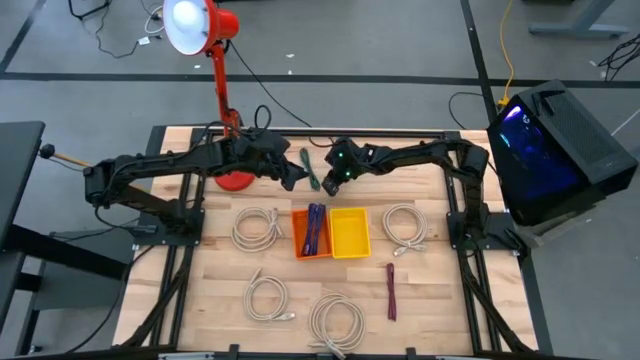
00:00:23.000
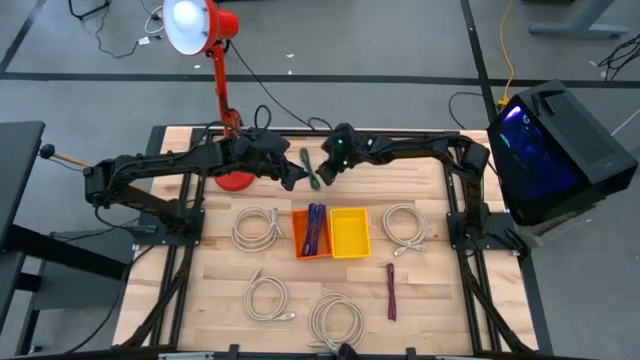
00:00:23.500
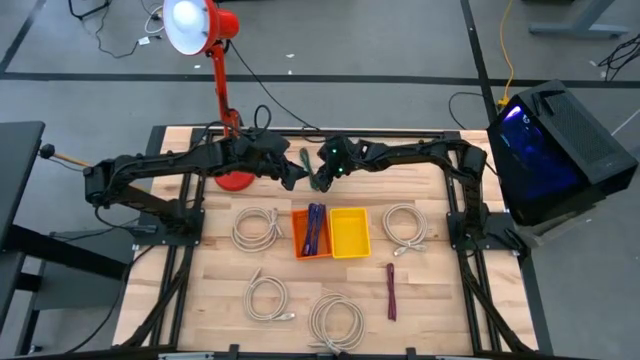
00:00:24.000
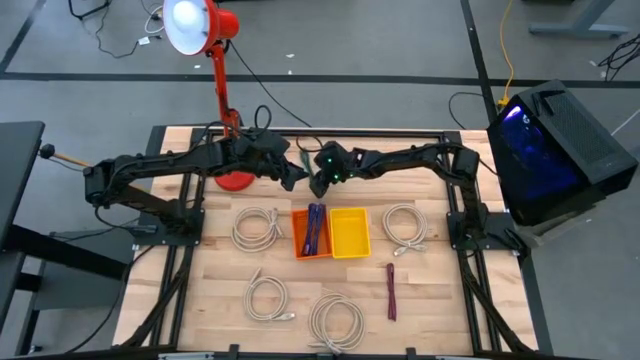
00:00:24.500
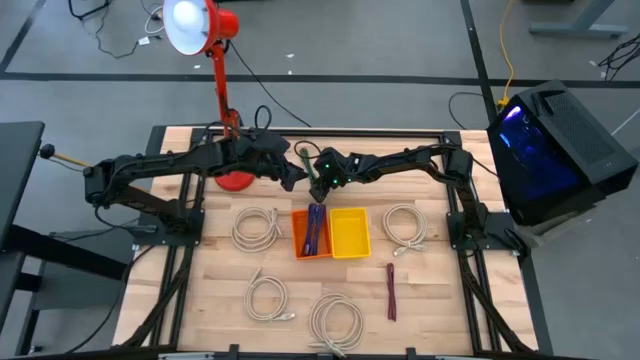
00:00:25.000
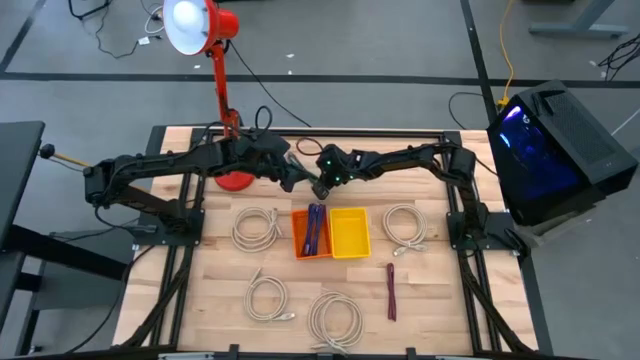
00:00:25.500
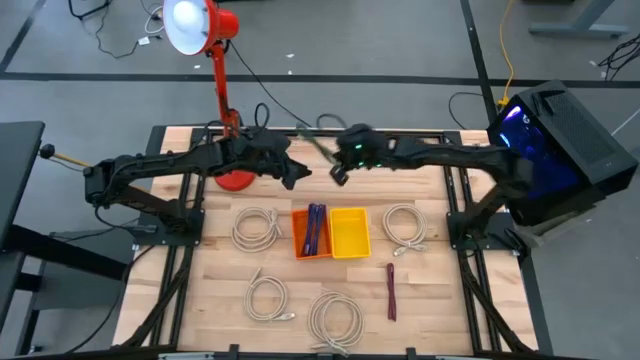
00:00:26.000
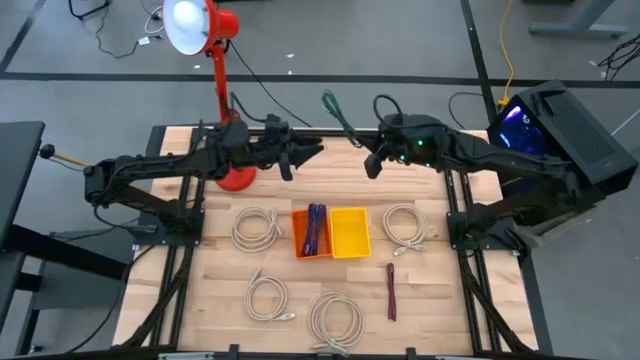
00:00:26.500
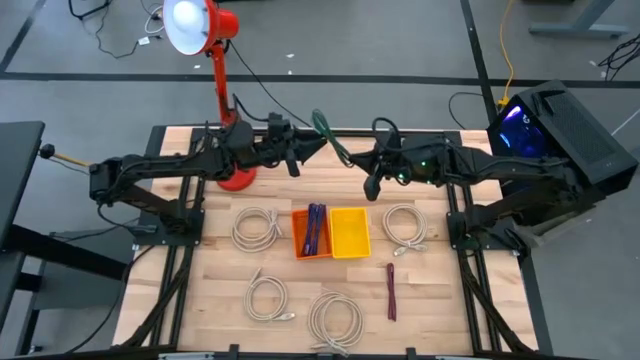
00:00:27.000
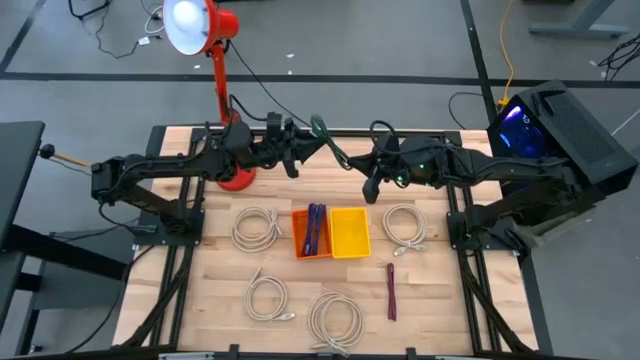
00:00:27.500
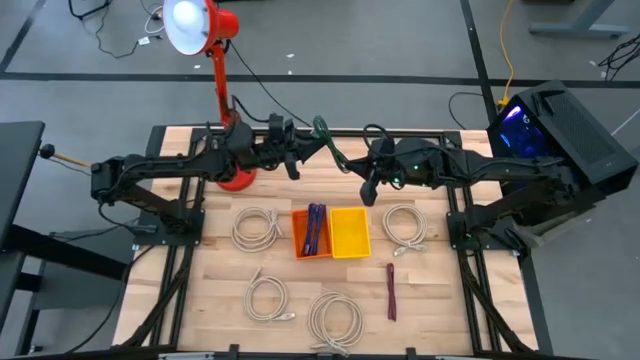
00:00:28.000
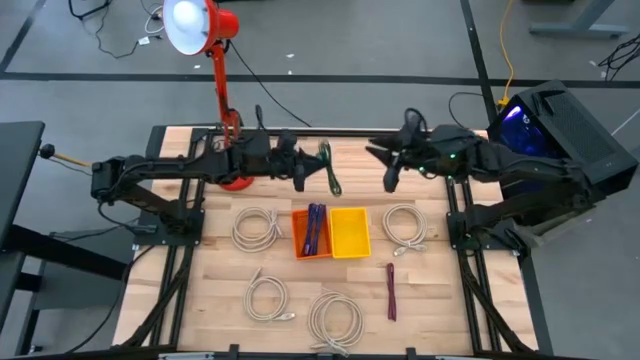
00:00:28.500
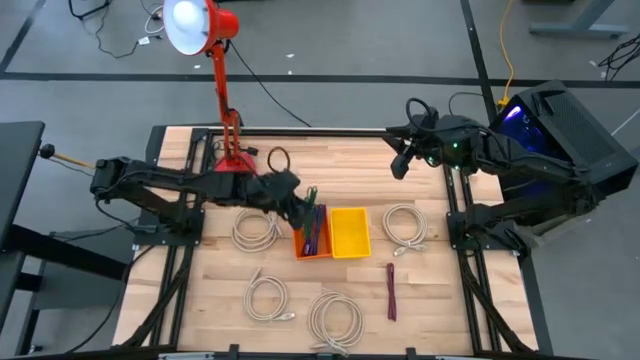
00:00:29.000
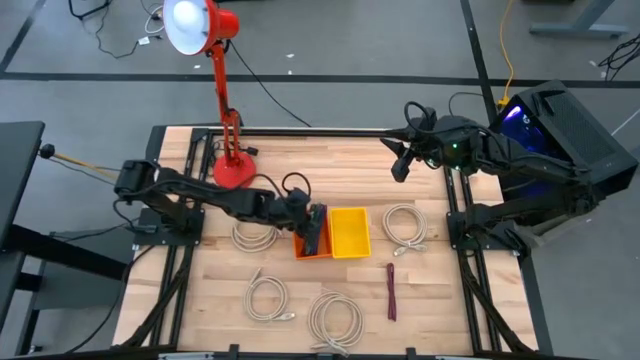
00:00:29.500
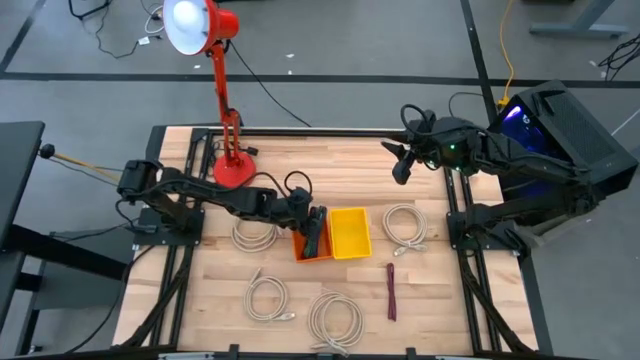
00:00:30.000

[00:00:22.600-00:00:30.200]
Task: Pick & Place USB Port
Put the green USB cable into the orange bin

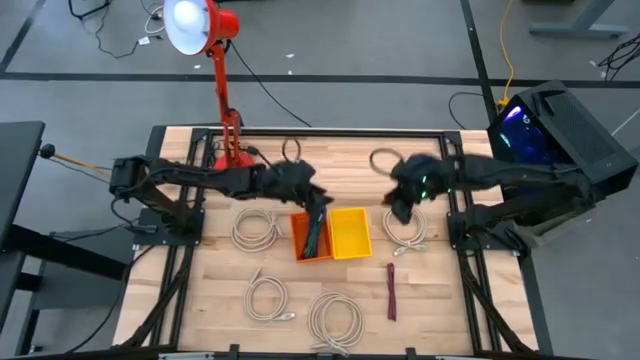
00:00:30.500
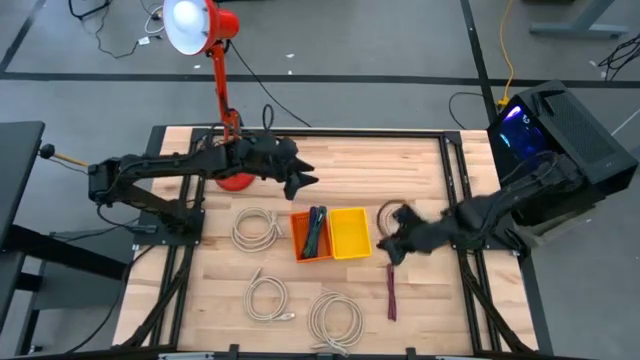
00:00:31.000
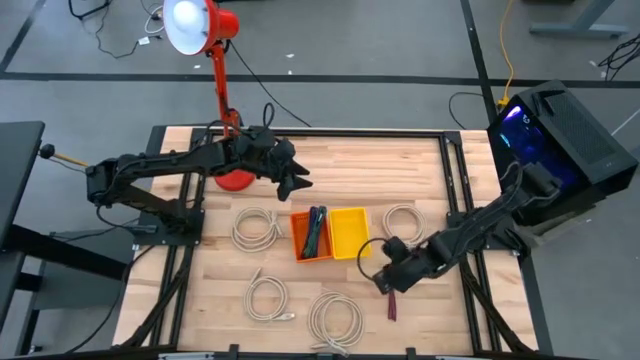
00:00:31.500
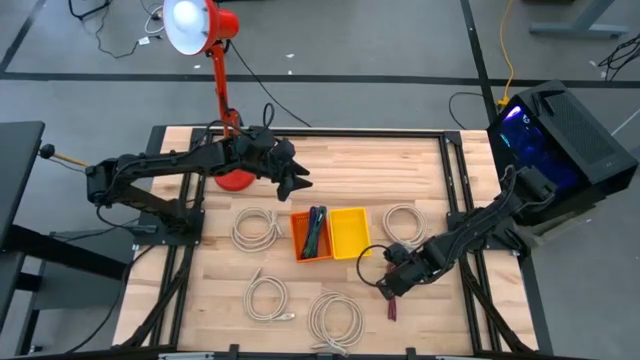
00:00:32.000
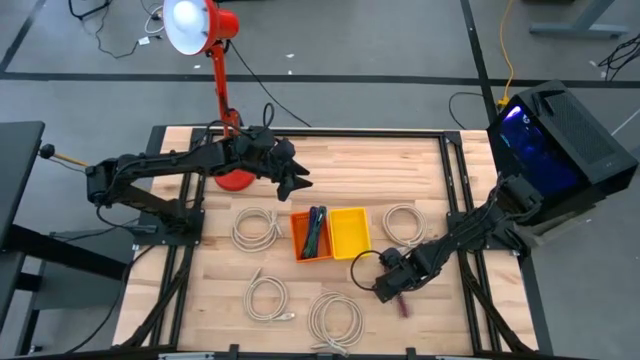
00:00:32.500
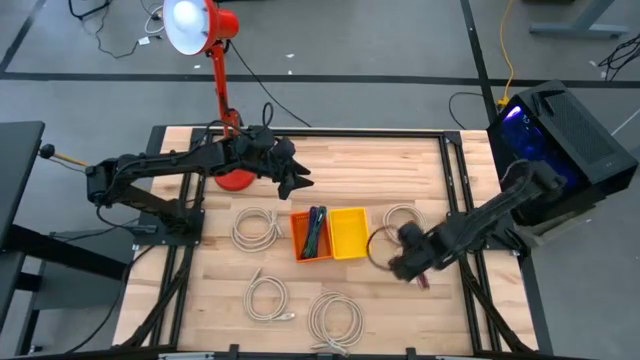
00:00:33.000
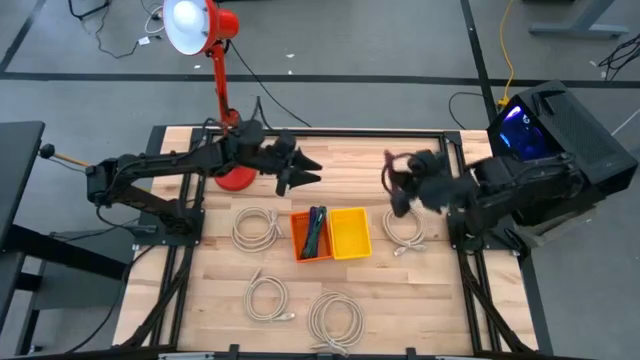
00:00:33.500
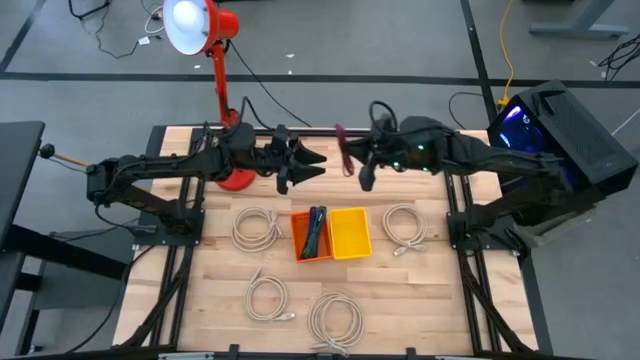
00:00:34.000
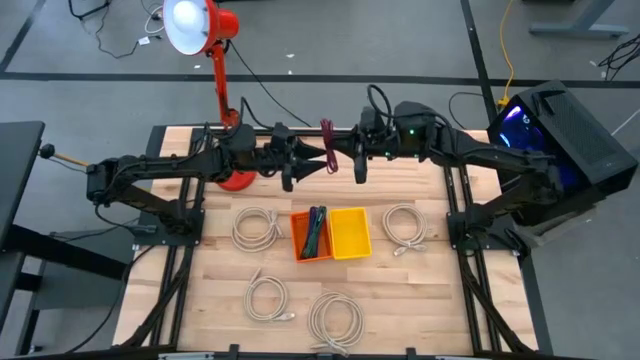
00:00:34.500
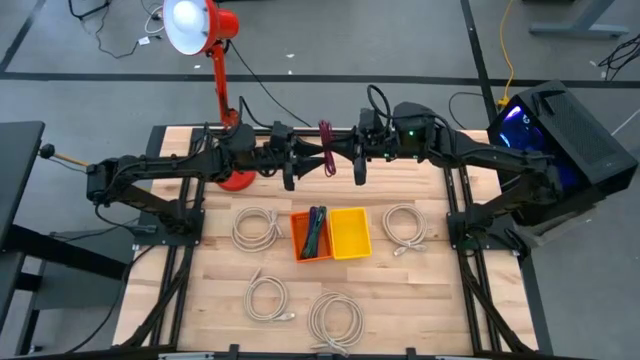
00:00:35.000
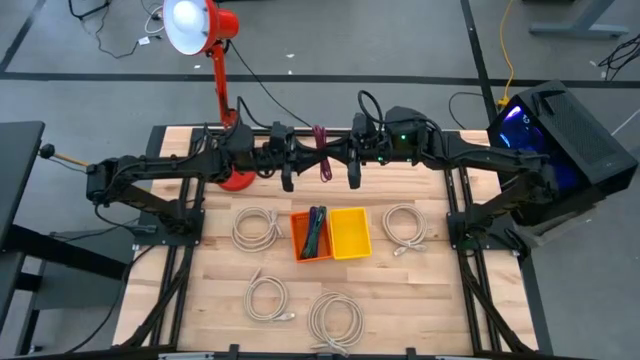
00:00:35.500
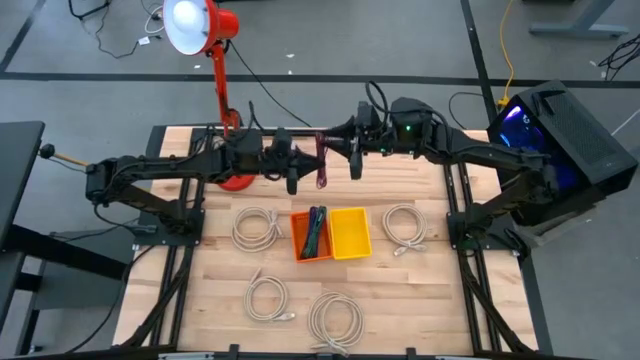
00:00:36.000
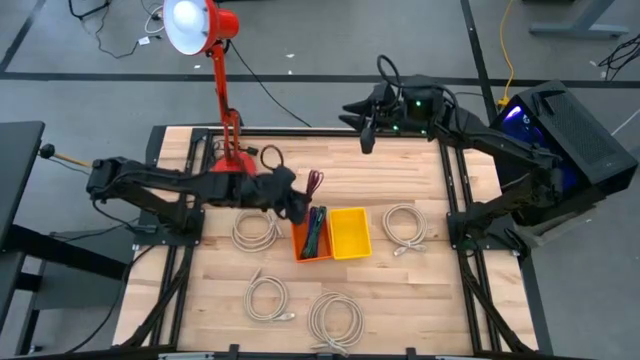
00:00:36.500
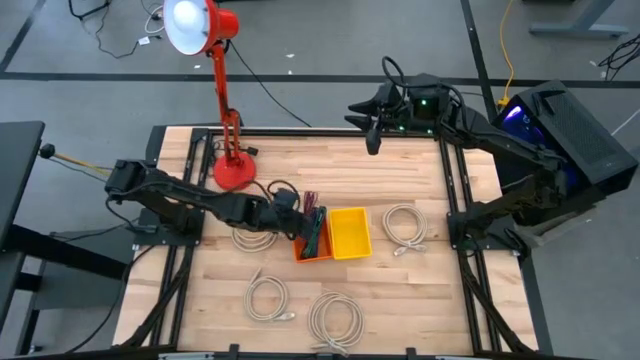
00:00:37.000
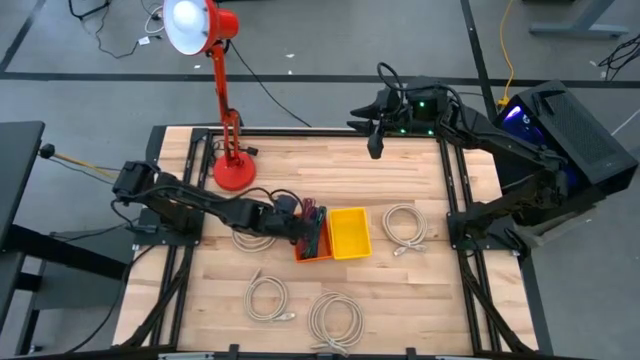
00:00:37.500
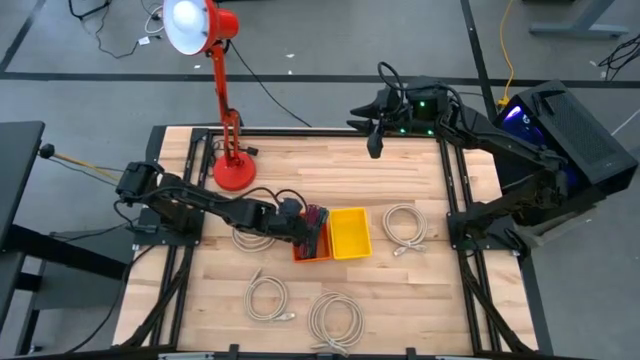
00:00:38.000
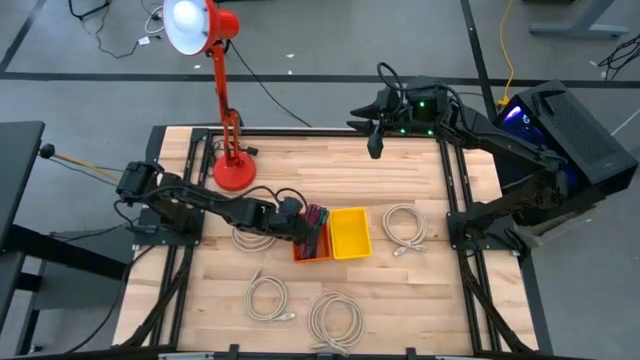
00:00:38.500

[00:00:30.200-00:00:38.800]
Put the red USB cable into the orange bin

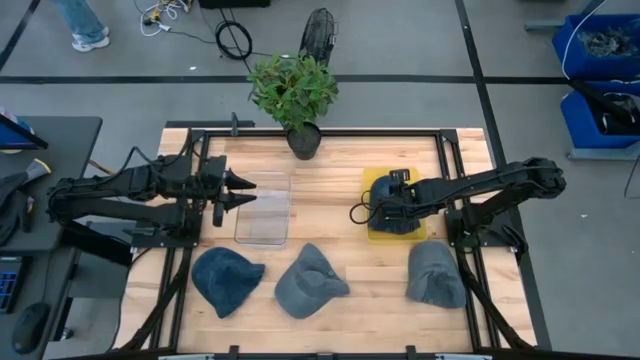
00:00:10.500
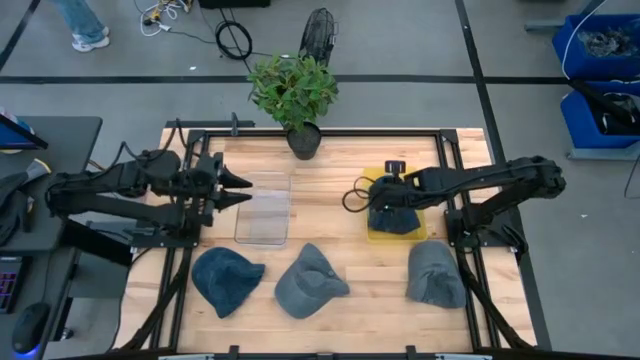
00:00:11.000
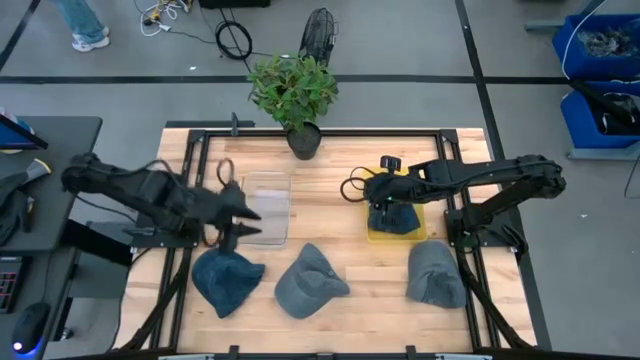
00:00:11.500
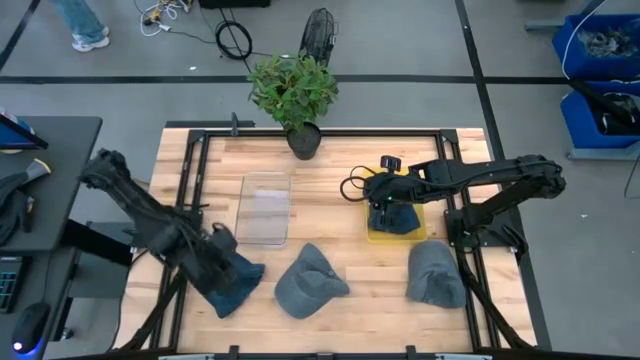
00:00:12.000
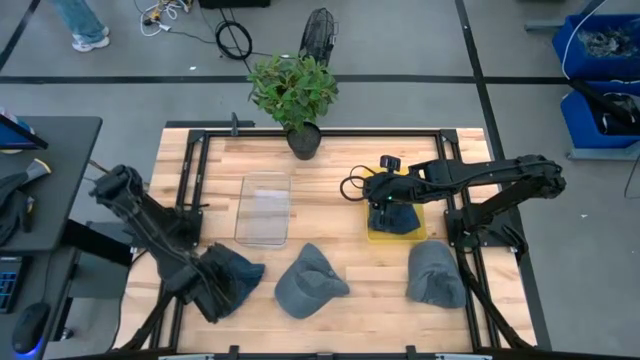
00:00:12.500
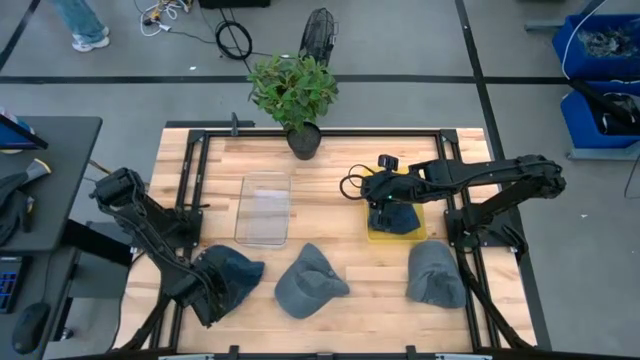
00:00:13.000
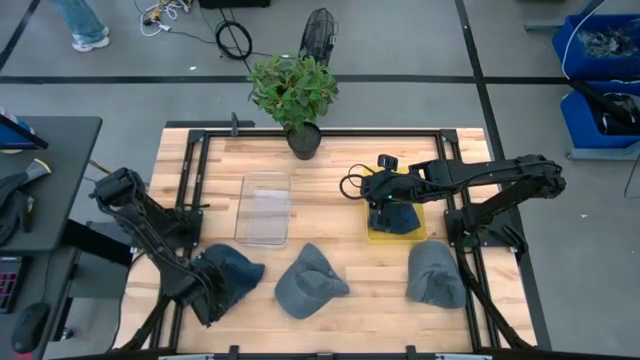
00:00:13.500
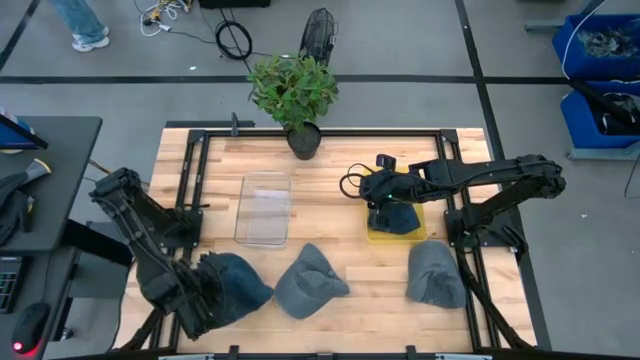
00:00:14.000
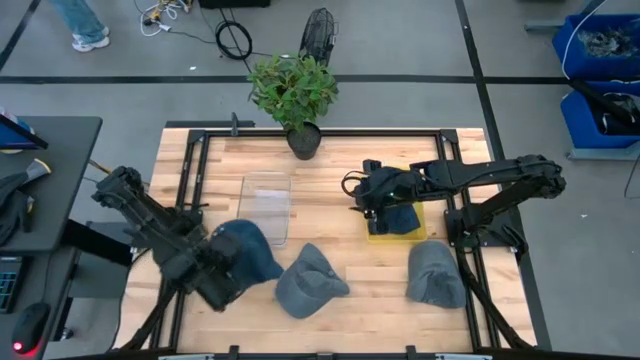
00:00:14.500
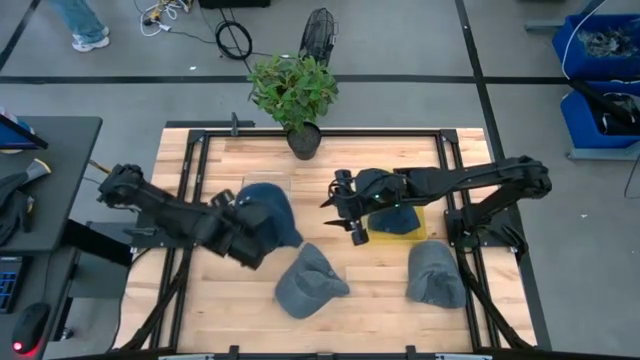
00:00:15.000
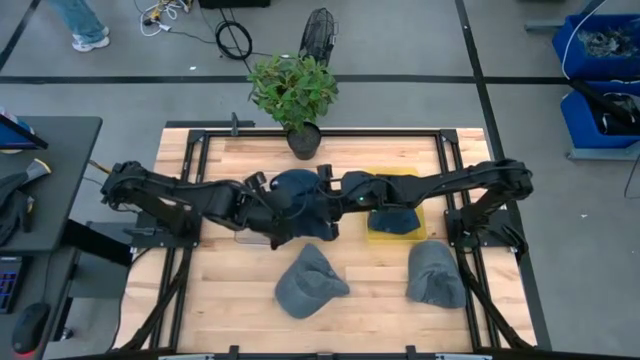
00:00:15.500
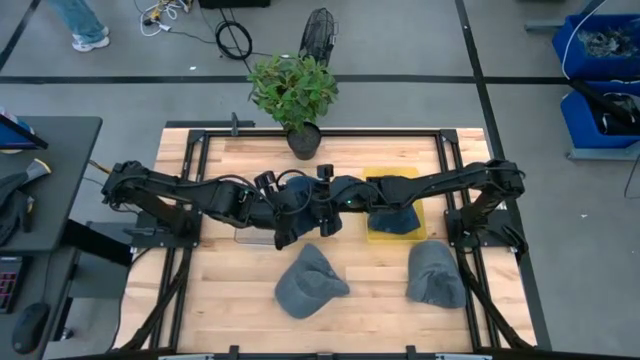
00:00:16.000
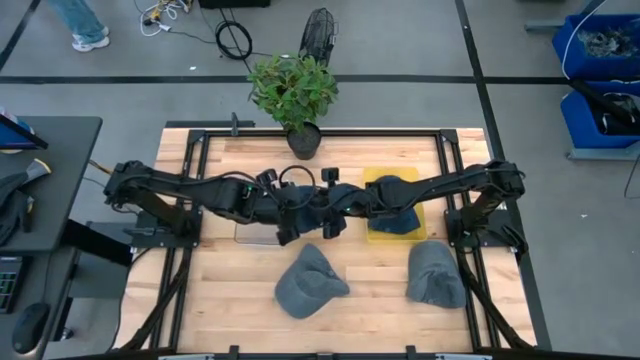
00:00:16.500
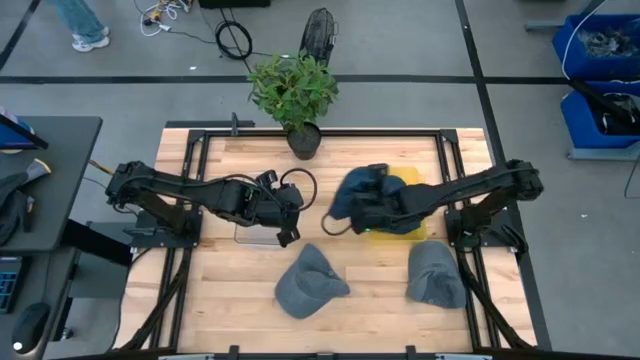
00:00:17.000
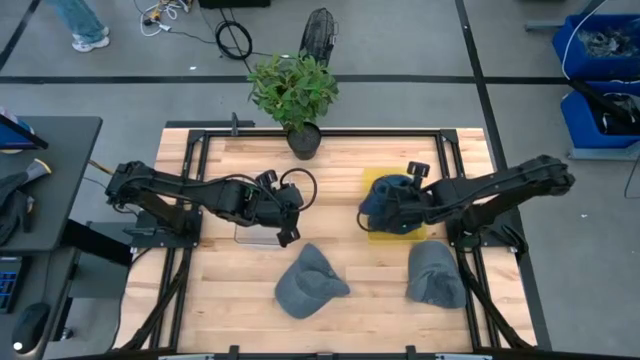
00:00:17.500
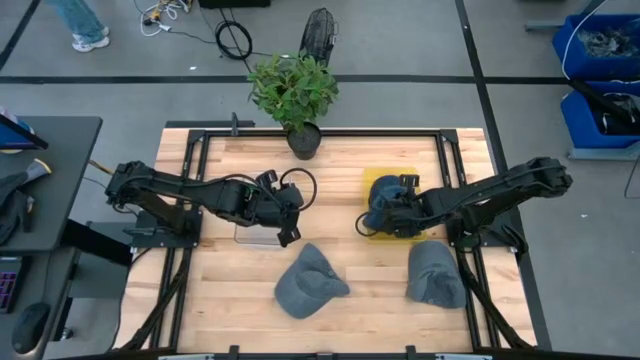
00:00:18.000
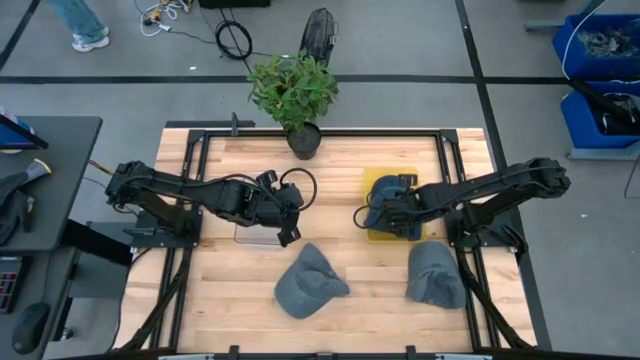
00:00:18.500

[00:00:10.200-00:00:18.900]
Task: Pick & Place hat
Put the blue cap into the yellow bin
